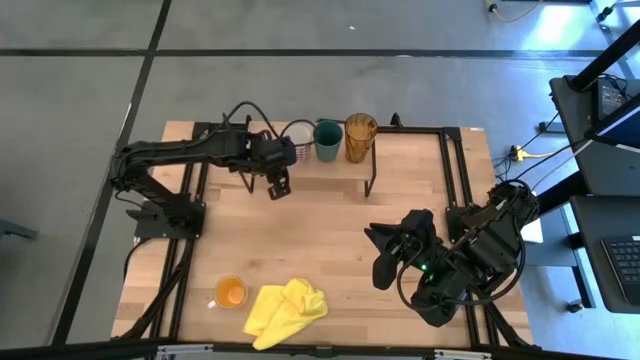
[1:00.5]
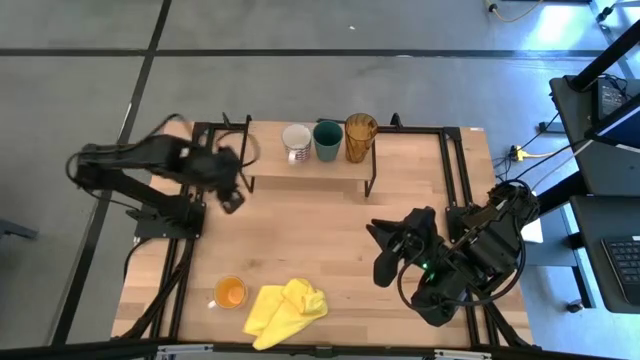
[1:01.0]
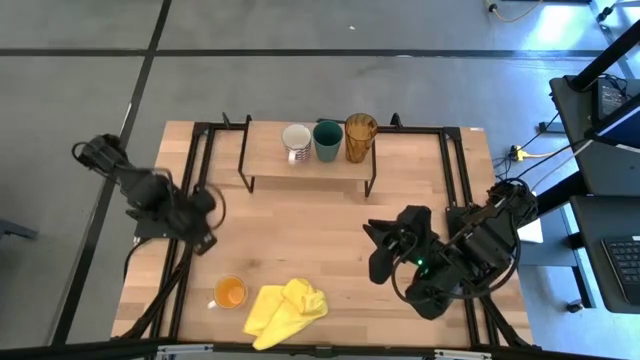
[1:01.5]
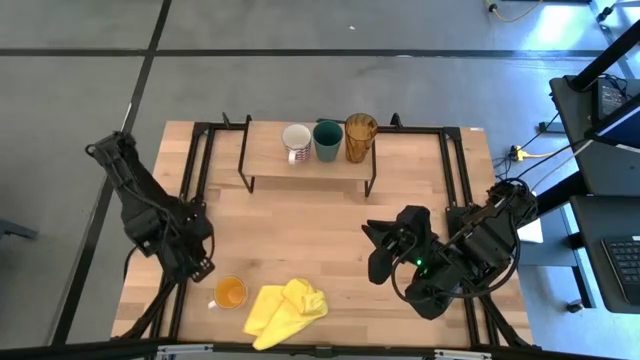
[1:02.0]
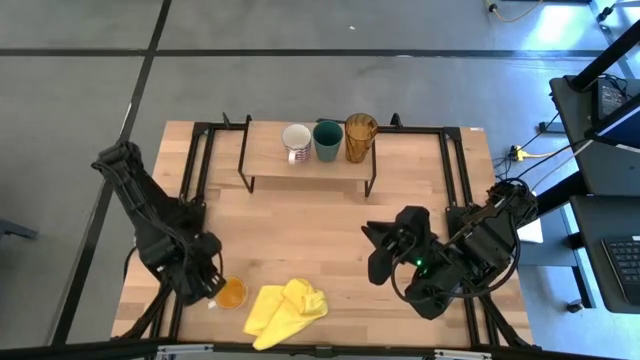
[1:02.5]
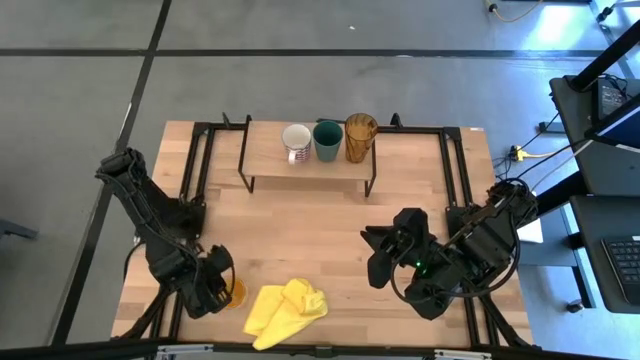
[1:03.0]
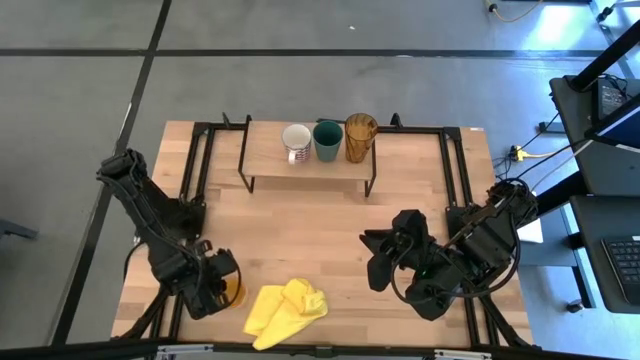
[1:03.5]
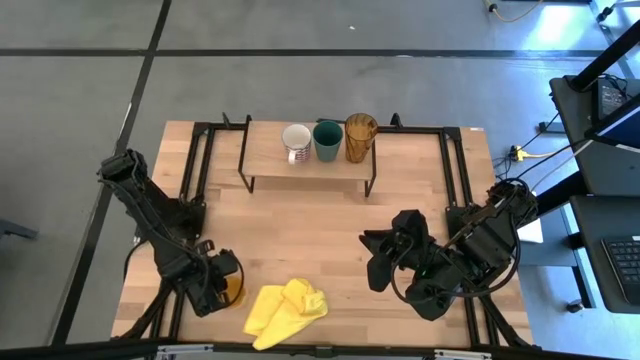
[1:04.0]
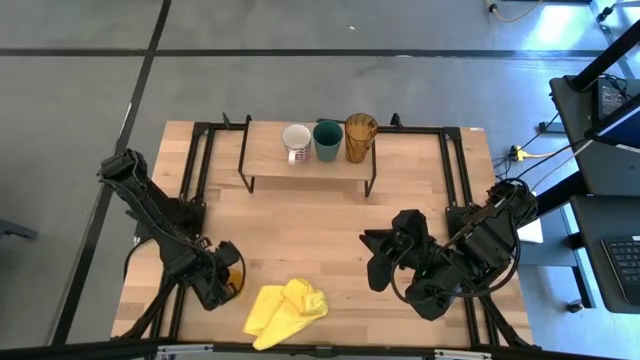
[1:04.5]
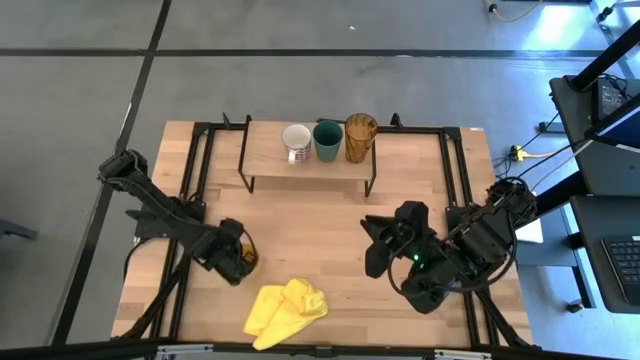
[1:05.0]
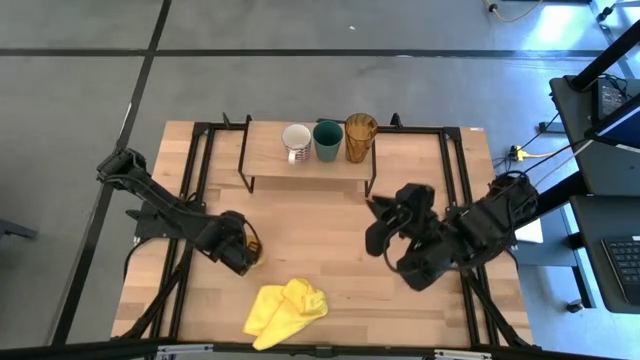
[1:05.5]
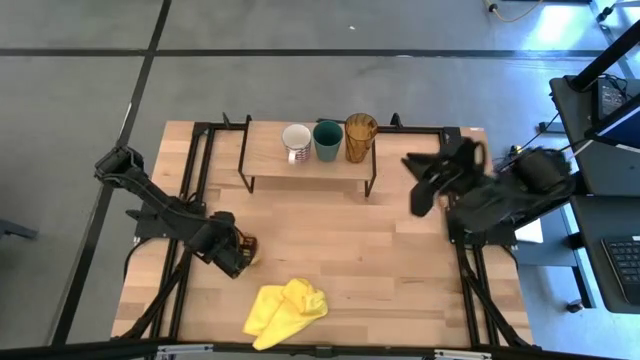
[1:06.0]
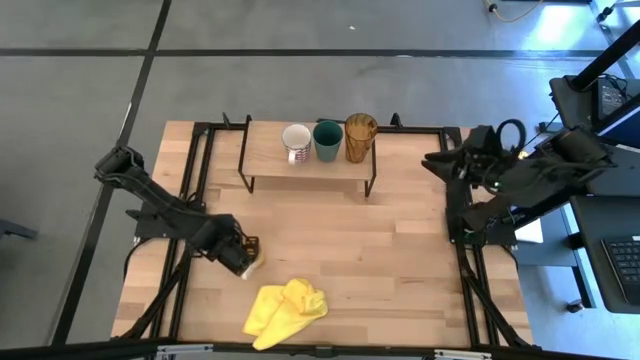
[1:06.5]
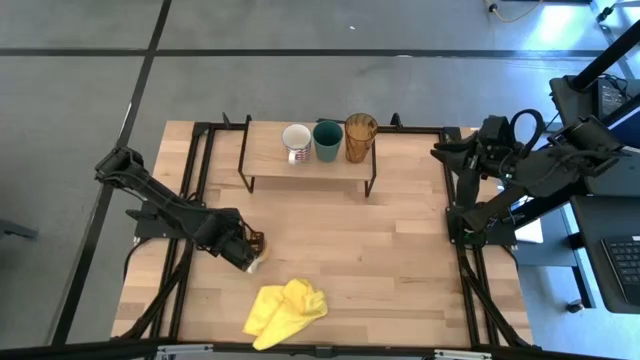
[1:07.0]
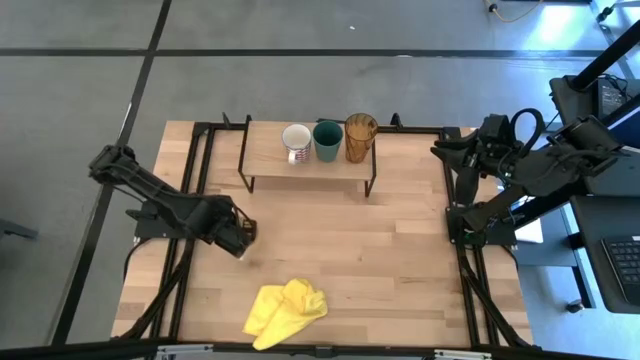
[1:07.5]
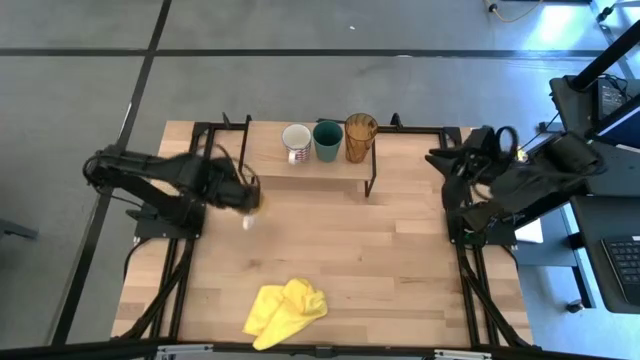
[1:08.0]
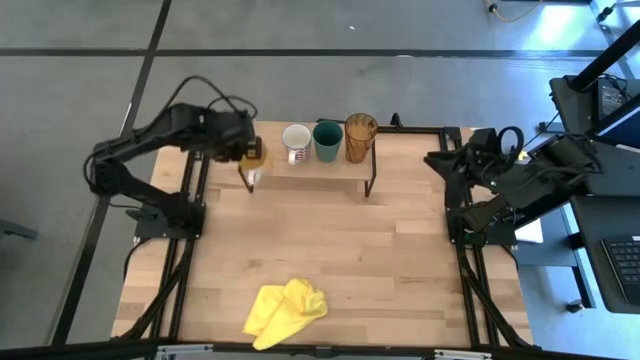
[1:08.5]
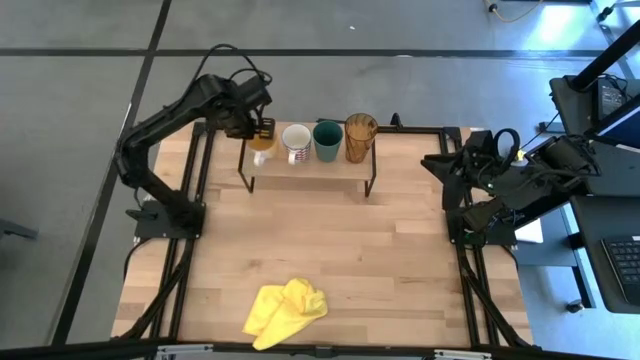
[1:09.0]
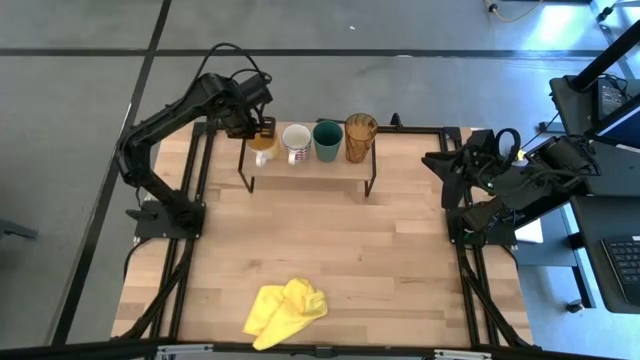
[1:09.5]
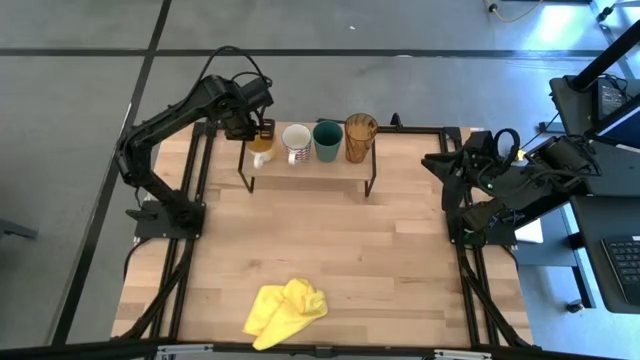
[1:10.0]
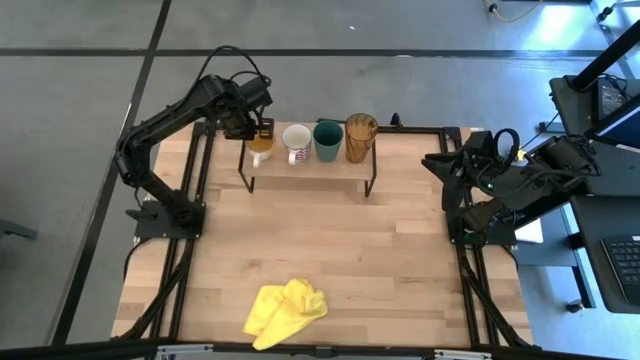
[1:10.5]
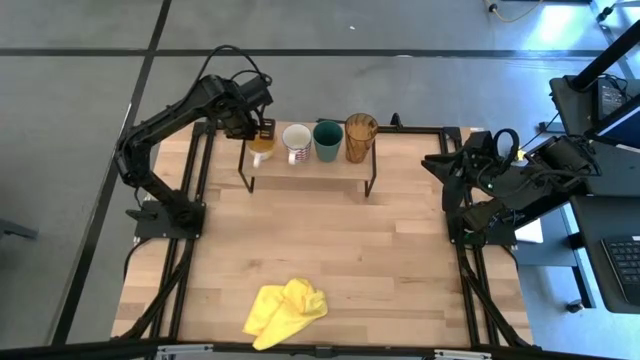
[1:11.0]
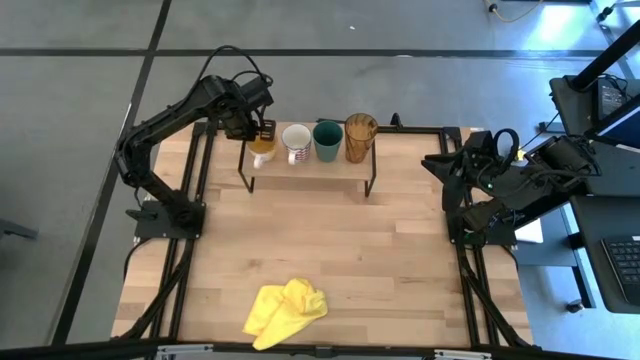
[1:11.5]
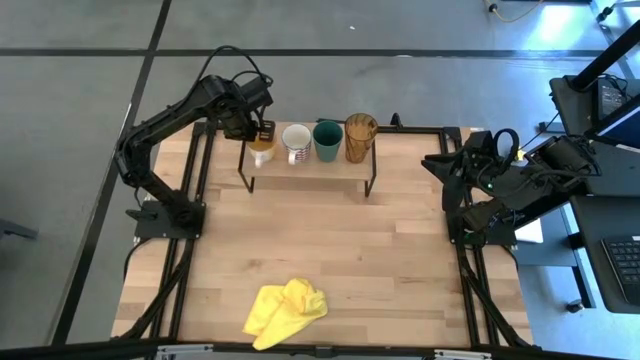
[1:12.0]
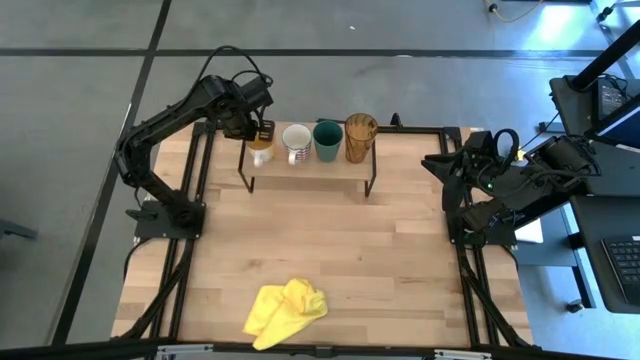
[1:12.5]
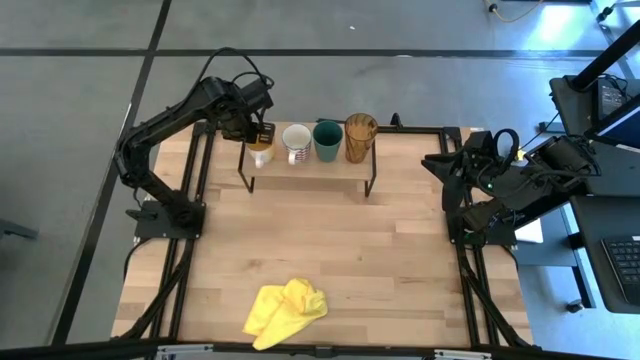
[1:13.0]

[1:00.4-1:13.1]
Task: Stack small to large cups/mugs on shelf
Put the yellow mug on the shelf

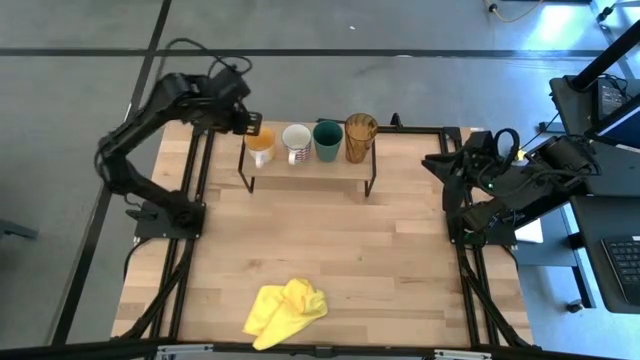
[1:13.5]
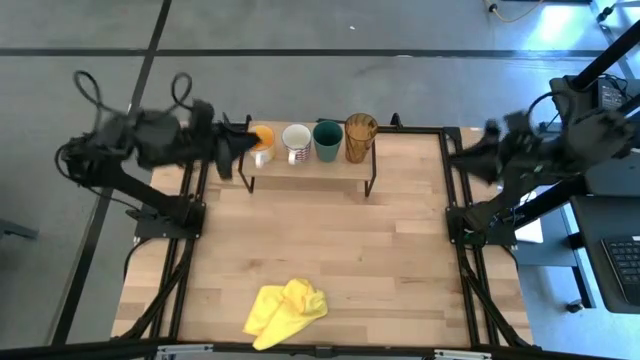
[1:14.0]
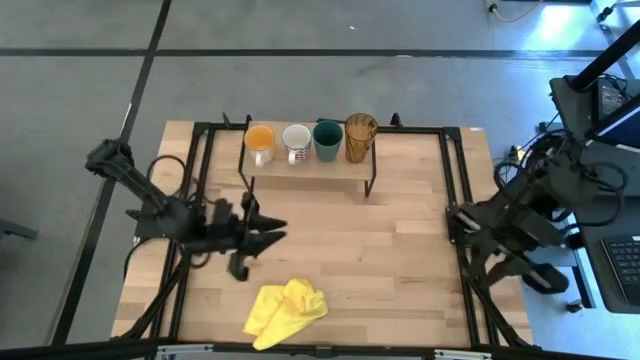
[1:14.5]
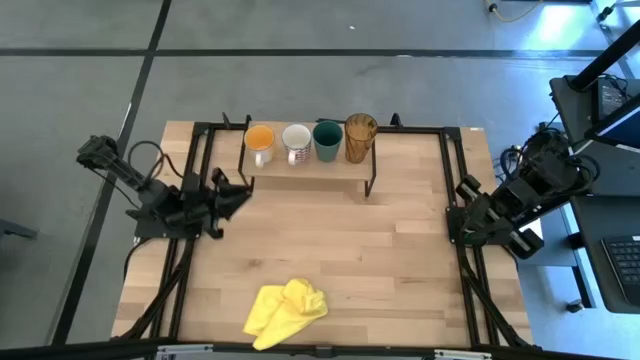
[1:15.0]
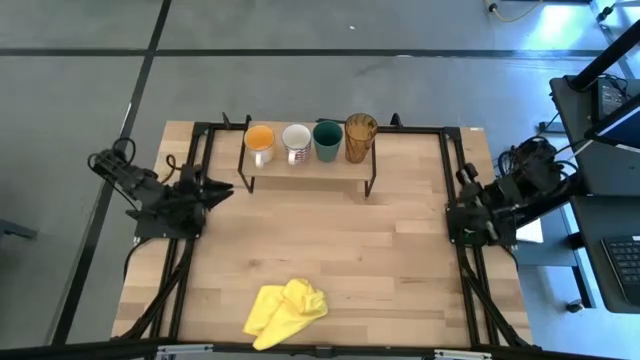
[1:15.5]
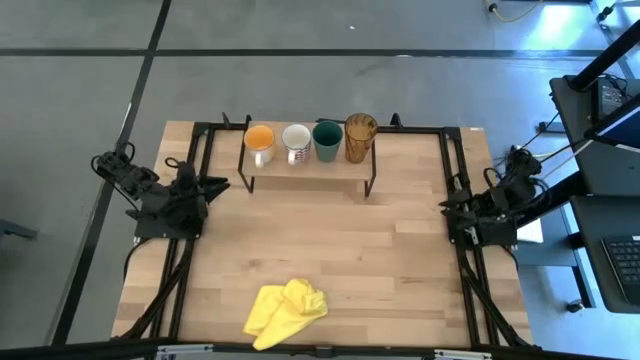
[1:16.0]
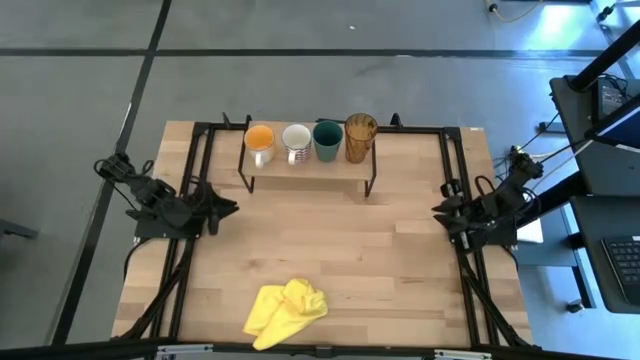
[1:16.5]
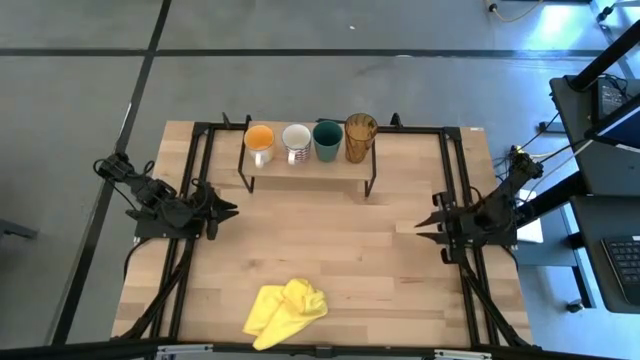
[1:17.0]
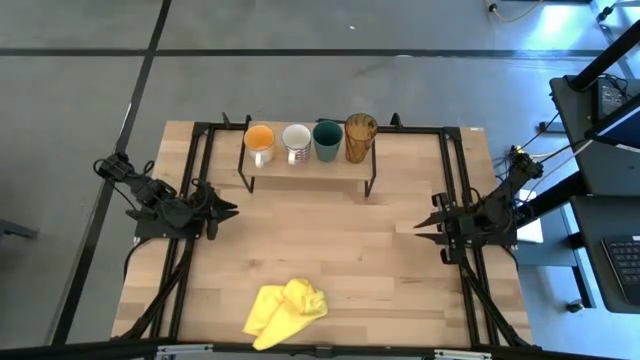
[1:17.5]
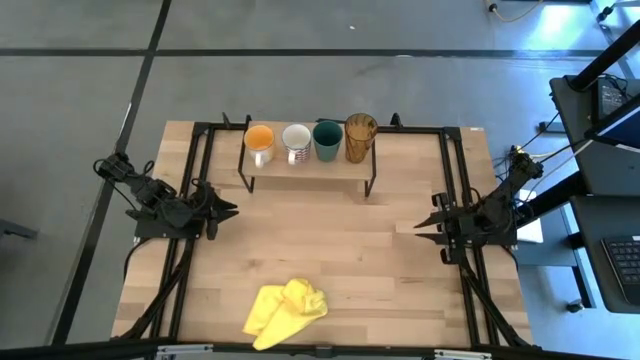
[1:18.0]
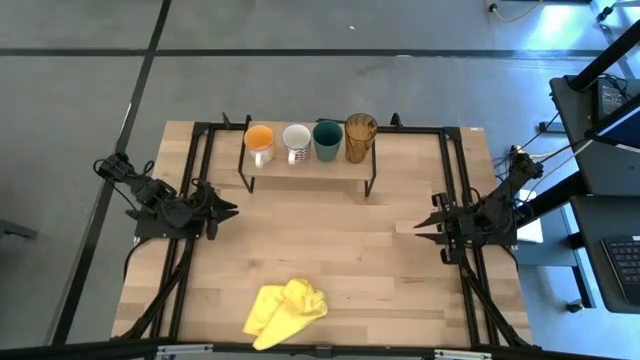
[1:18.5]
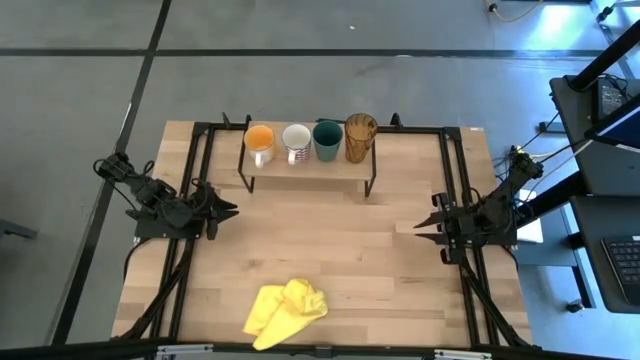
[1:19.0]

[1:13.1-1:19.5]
Return to Home Position

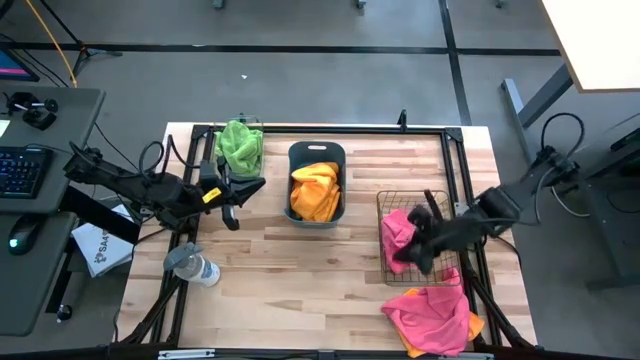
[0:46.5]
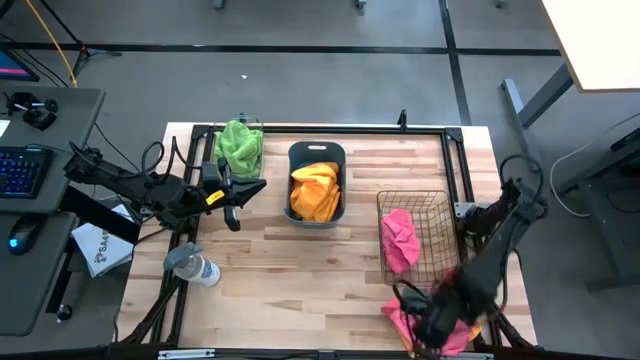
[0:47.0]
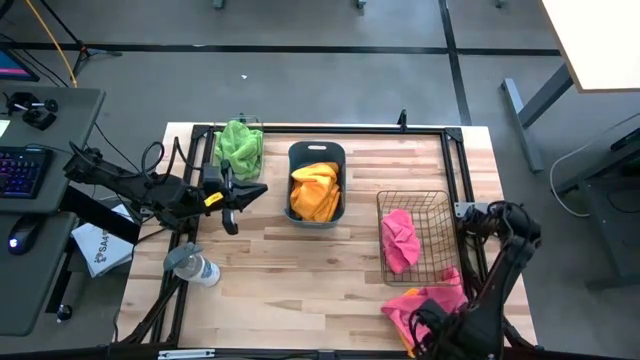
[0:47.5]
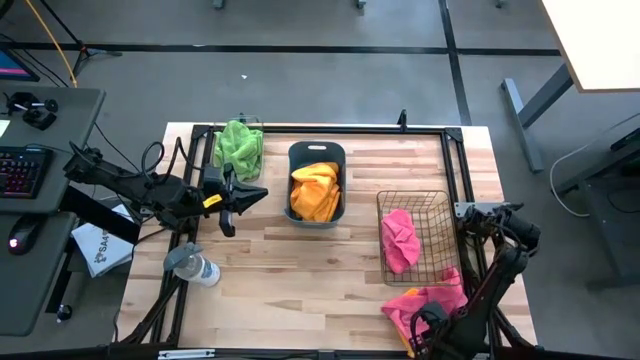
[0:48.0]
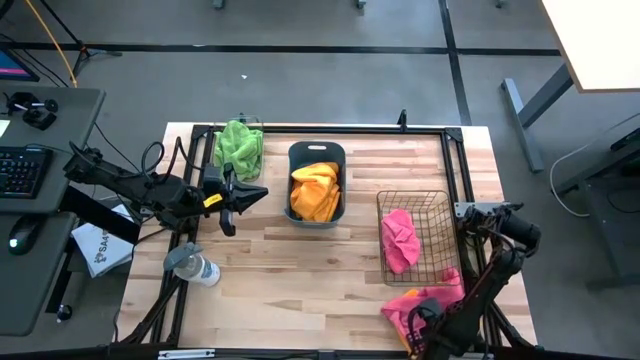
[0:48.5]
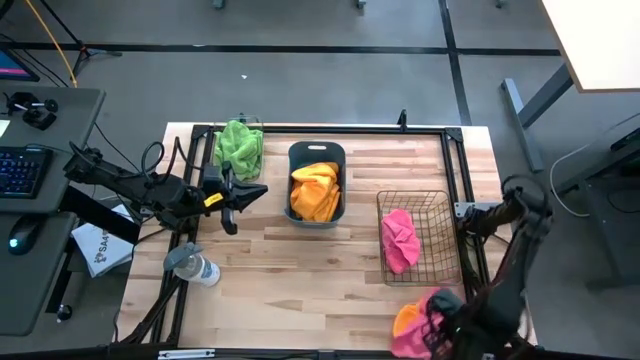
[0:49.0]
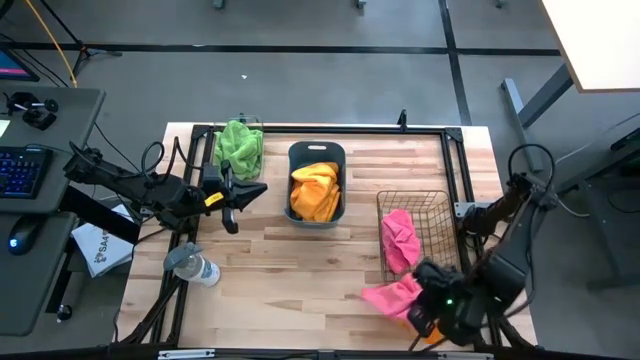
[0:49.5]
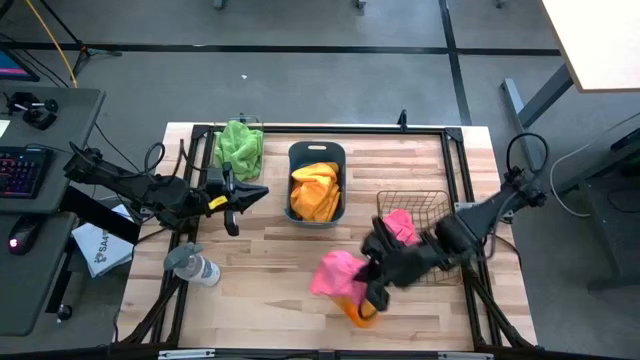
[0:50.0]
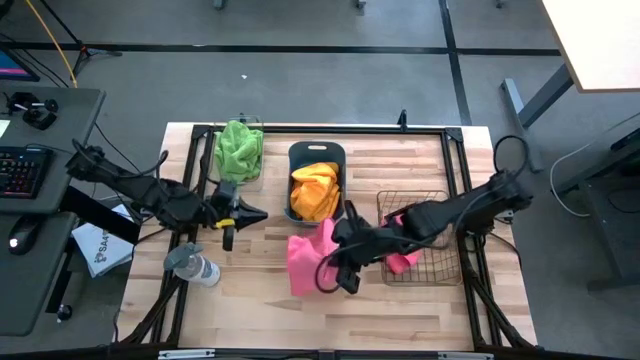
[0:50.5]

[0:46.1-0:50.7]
Task: Sort microfiber towel by color & place in baskets
Put the pink towel into the brown wire basket
